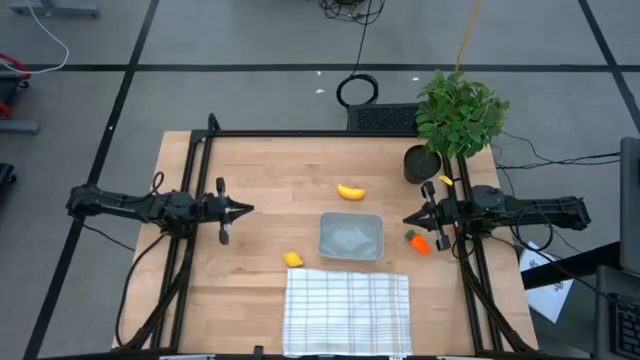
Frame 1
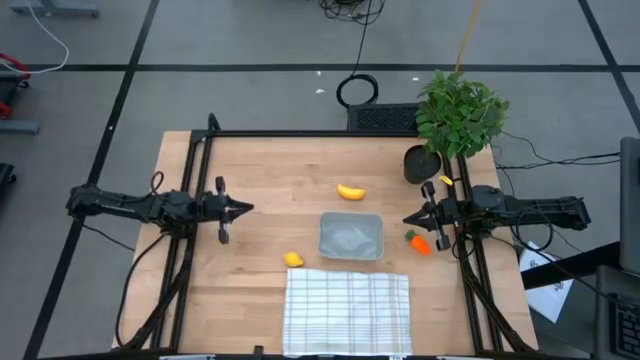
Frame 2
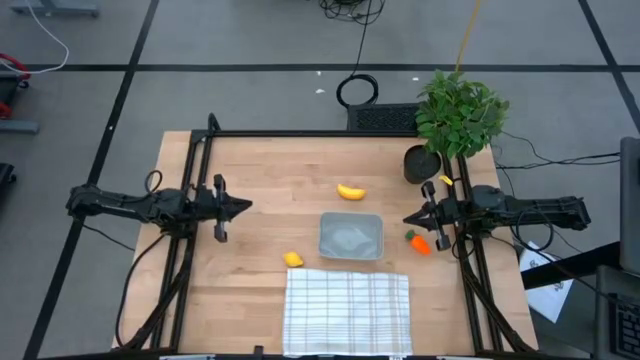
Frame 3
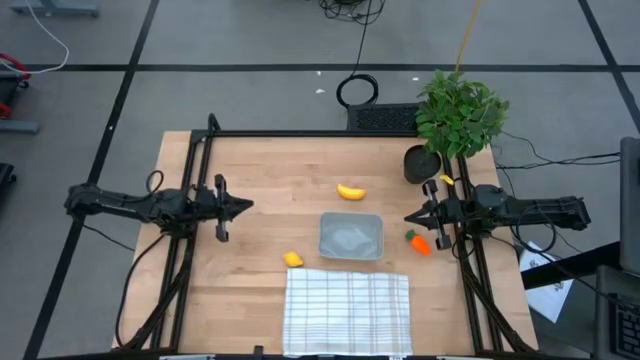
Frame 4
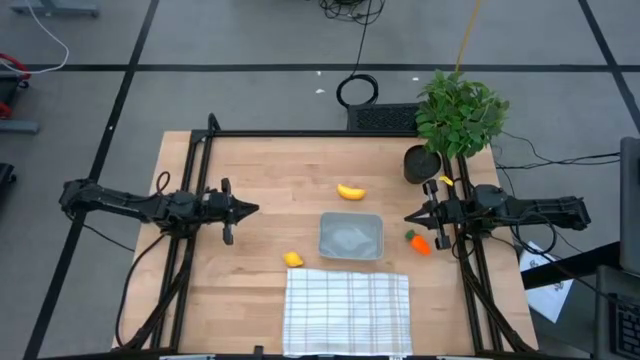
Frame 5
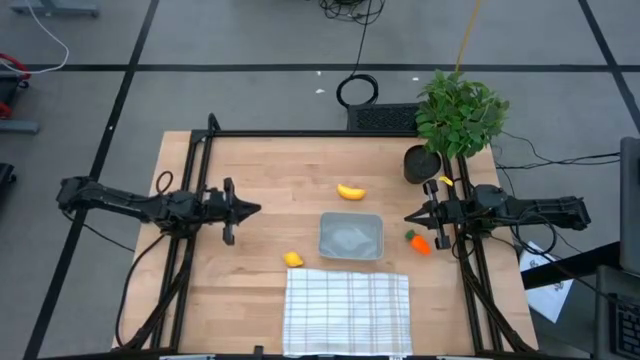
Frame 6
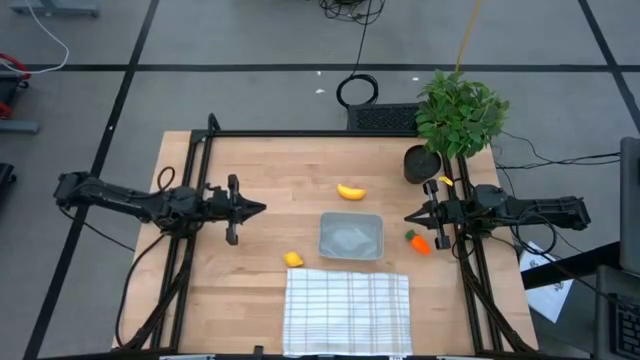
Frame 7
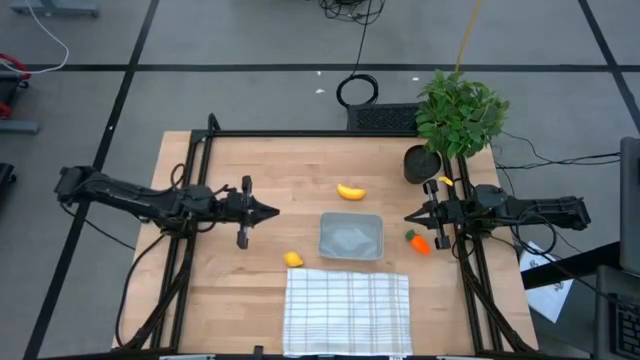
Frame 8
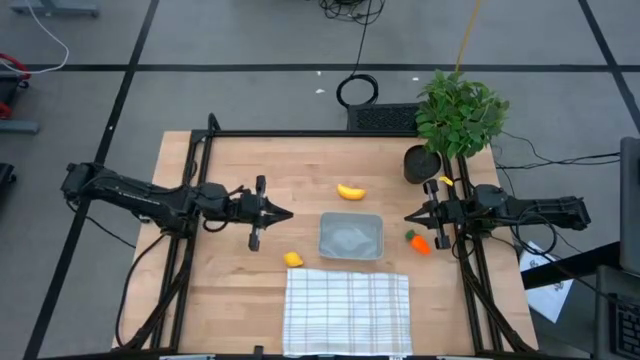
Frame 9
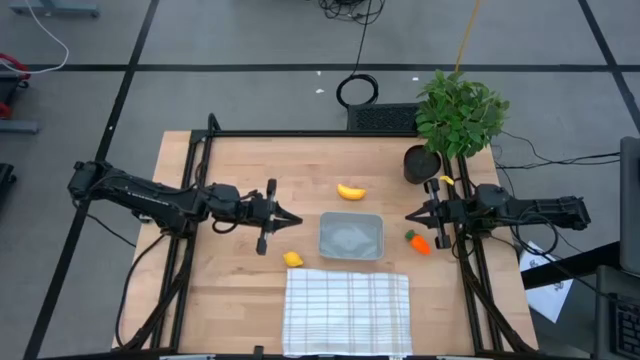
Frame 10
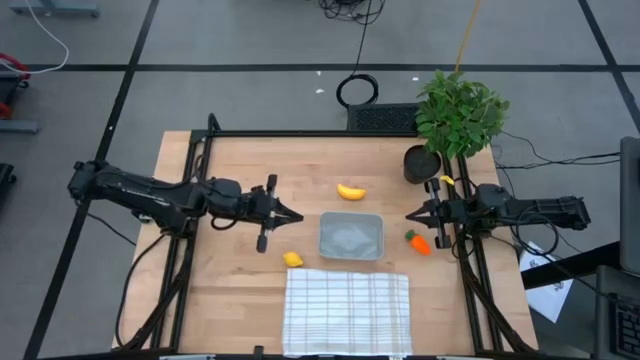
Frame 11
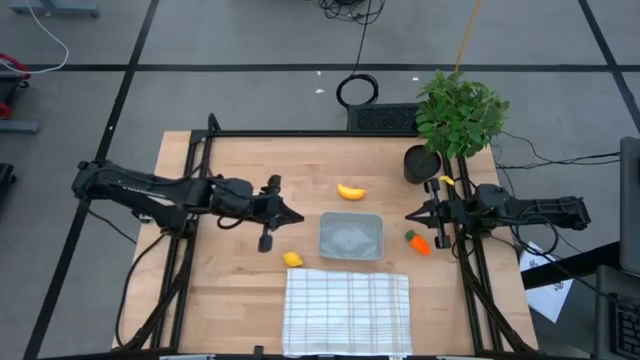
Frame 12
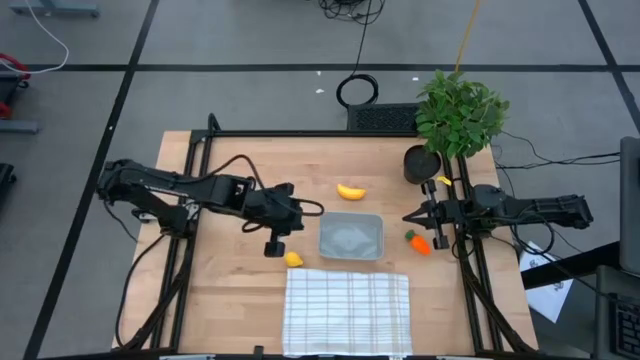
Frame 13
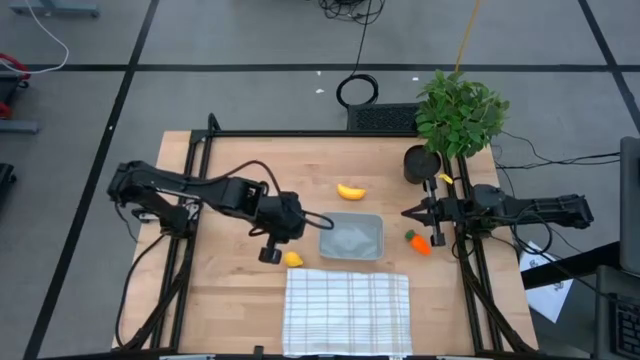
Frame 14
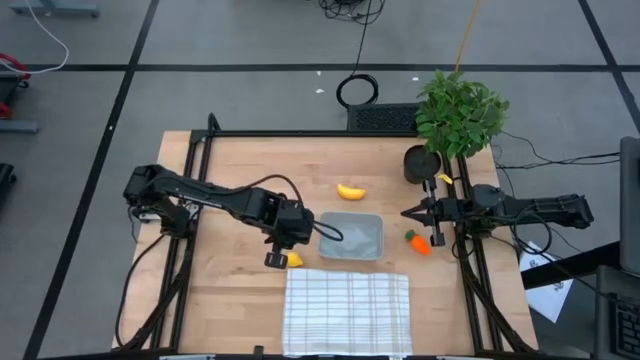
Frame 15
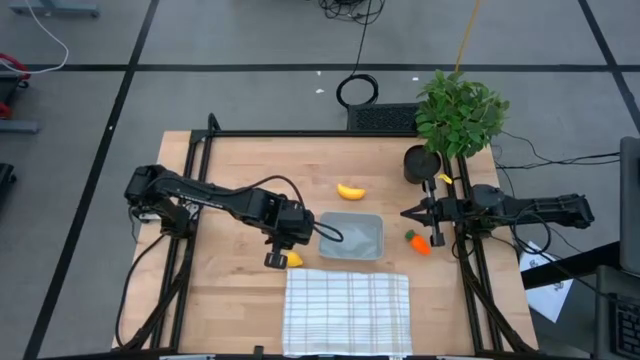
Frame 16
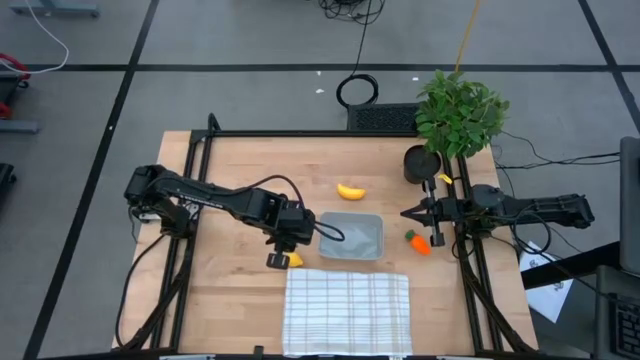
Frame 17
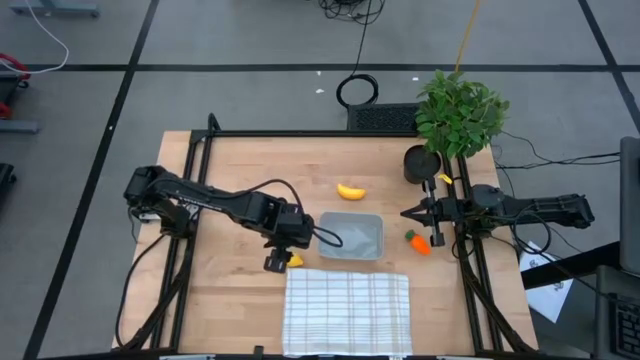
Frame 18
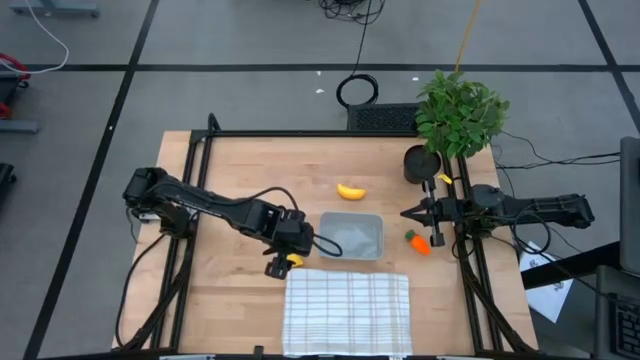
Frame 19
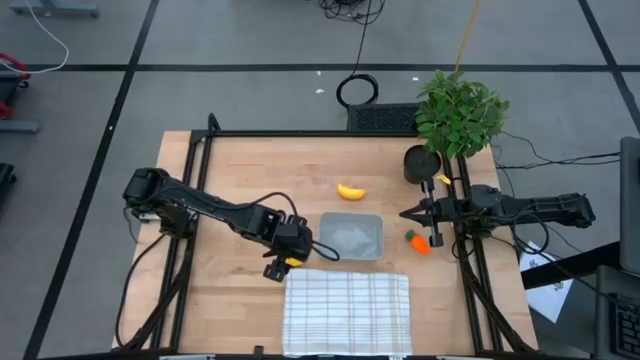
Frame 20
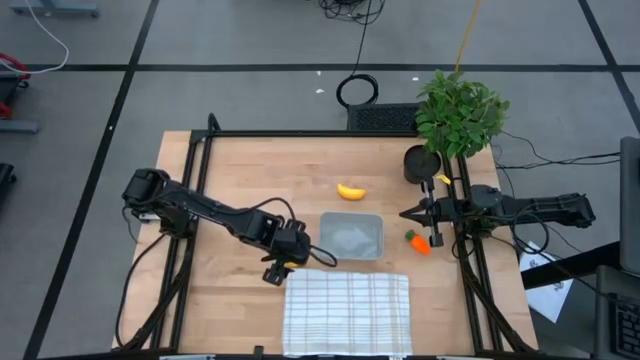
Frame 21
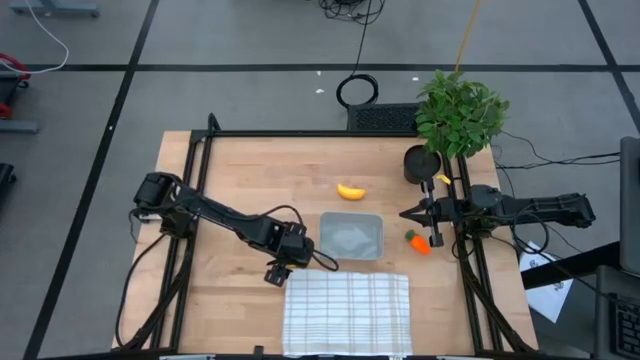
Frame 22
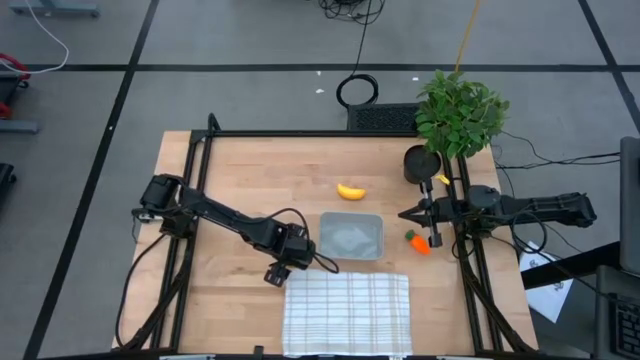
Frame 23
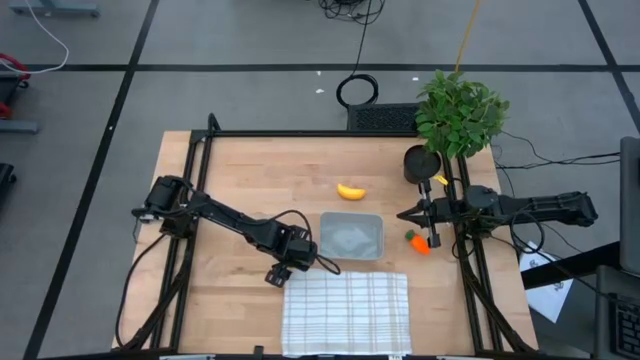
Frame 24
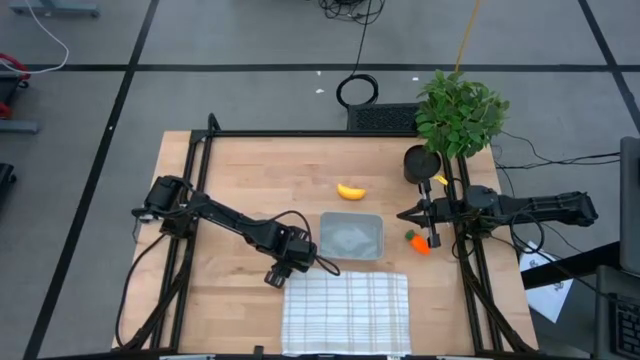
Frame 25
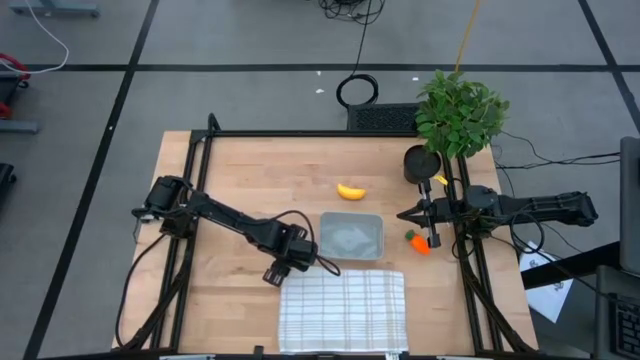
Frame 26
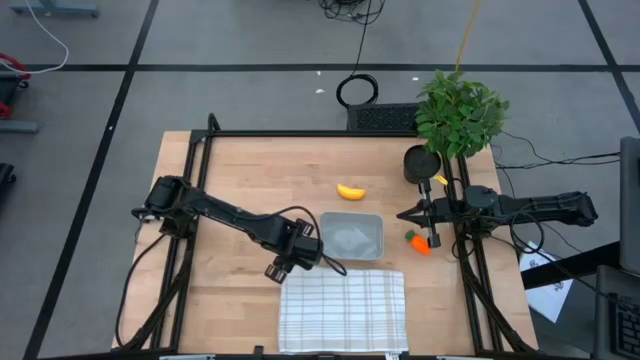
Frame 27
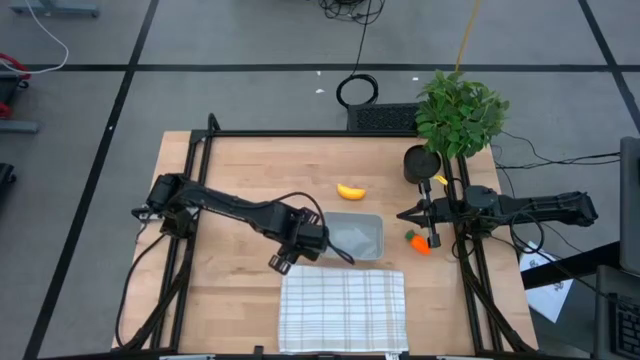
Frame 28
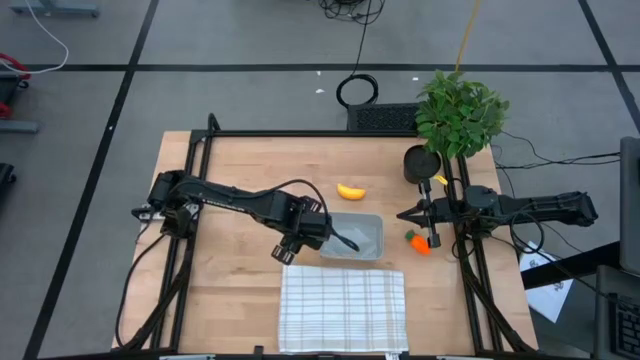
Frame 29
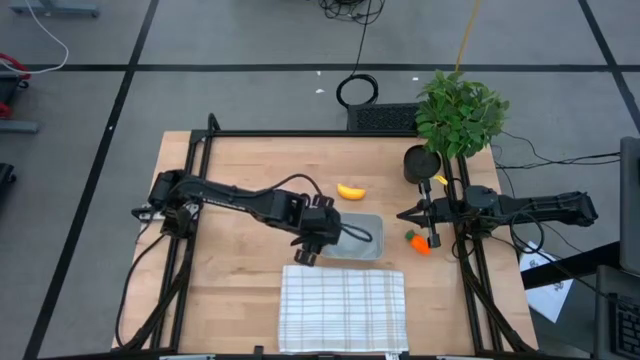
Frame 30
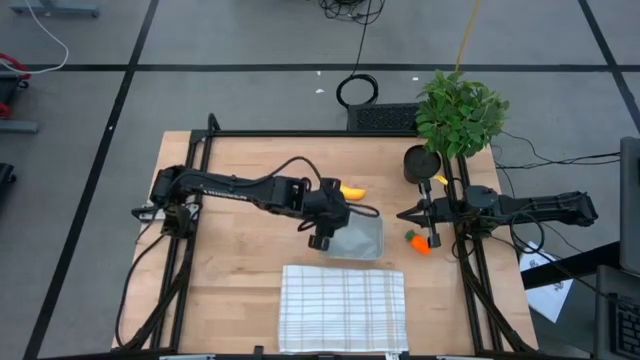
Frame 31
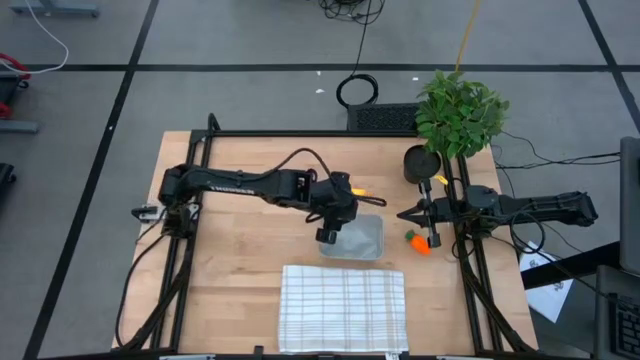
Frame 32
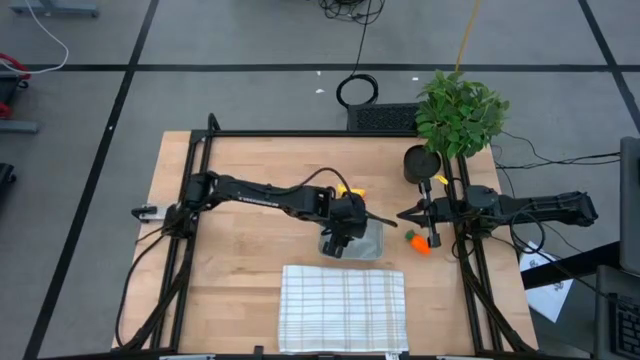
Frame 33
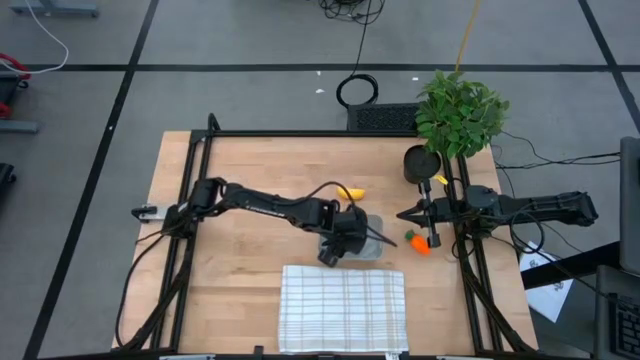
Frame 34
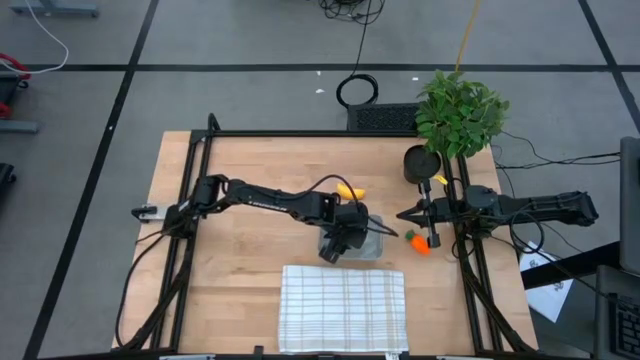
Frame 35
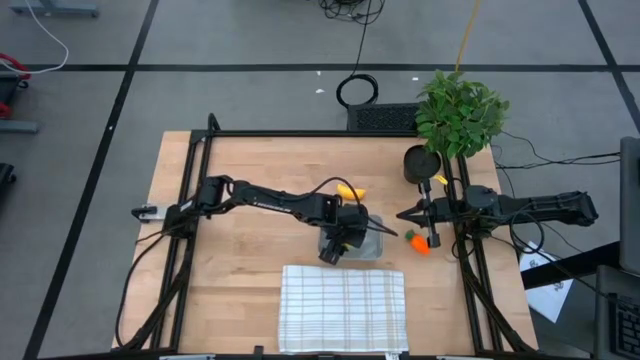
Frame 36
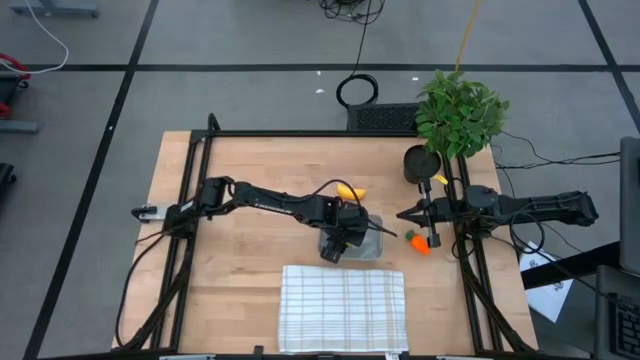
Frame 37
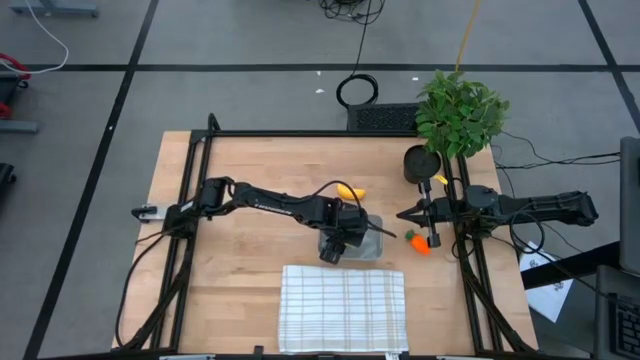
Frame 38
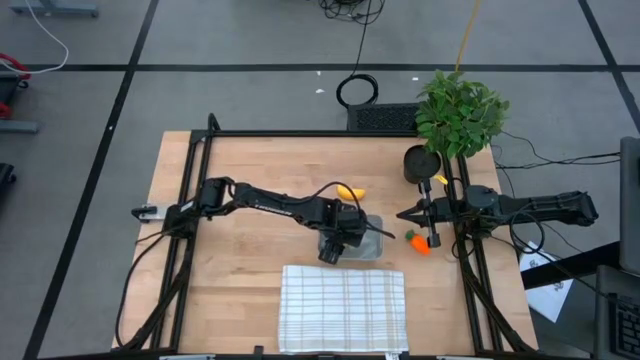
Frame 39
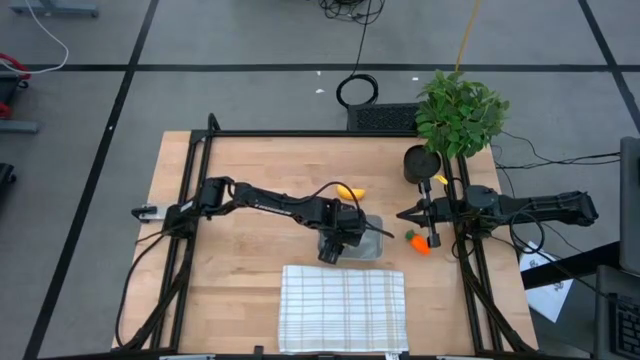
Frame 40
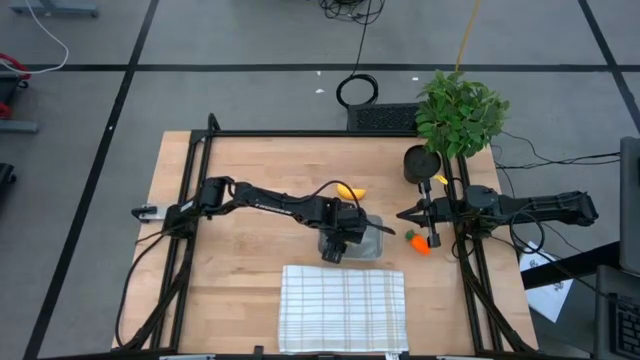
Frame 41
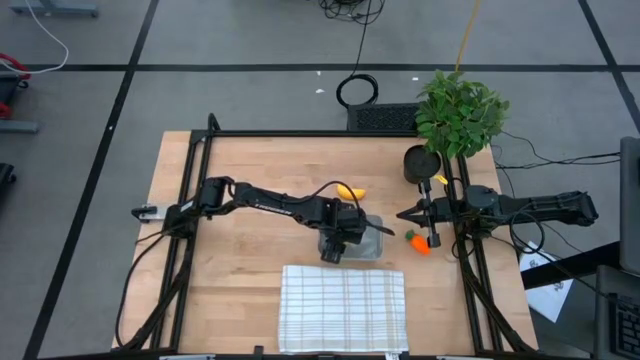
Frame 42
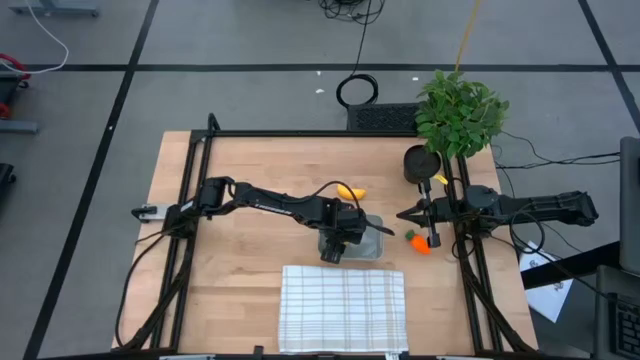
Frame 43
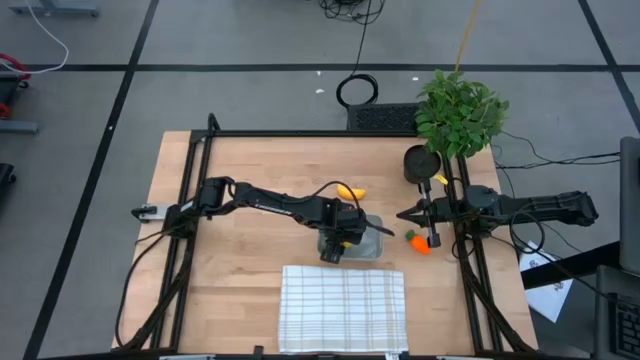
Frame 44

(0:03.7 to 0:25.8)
Task: Pick and placing Produce into tupperware
Put the yellow lemon into the gray bin
